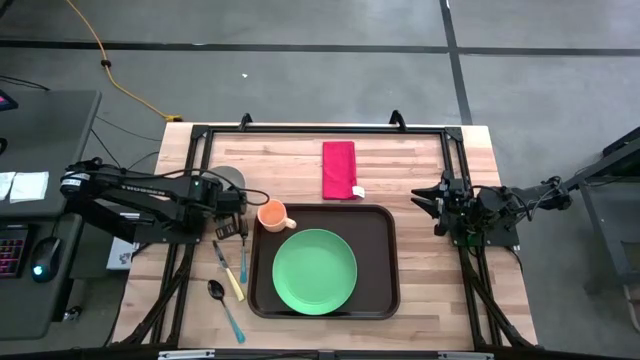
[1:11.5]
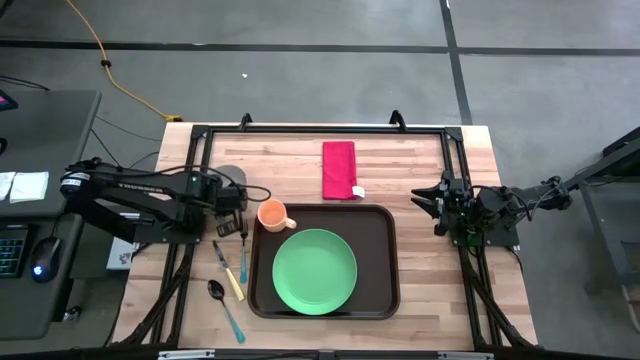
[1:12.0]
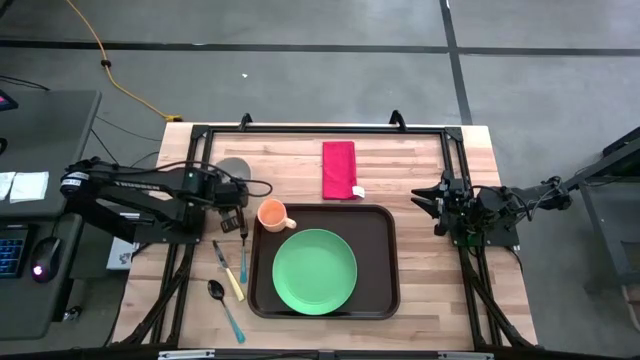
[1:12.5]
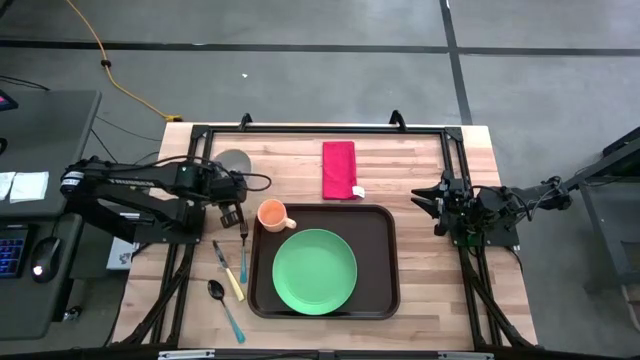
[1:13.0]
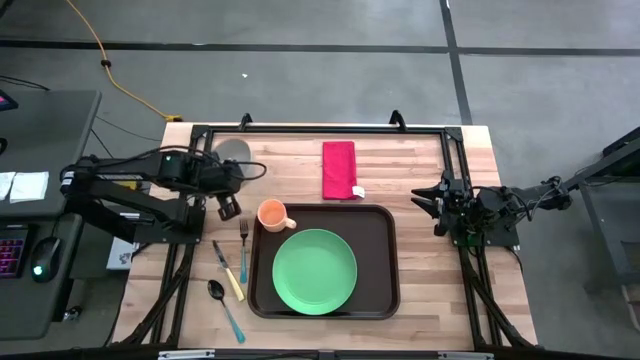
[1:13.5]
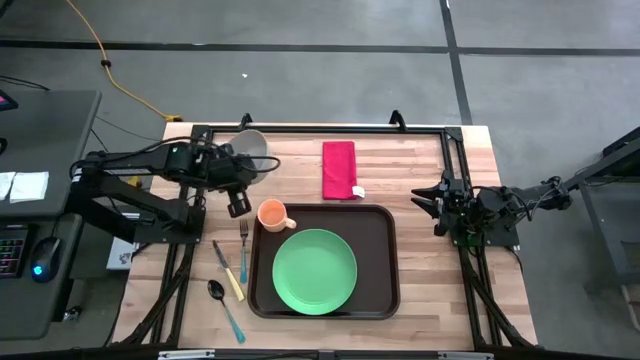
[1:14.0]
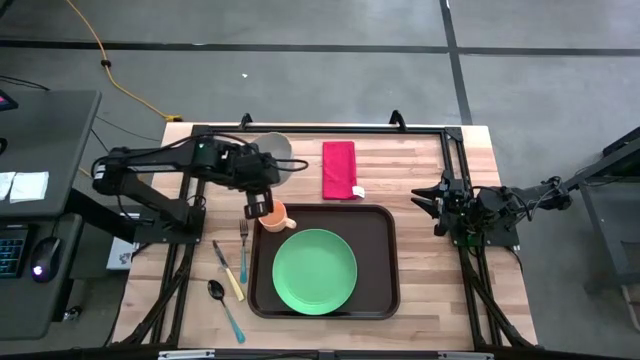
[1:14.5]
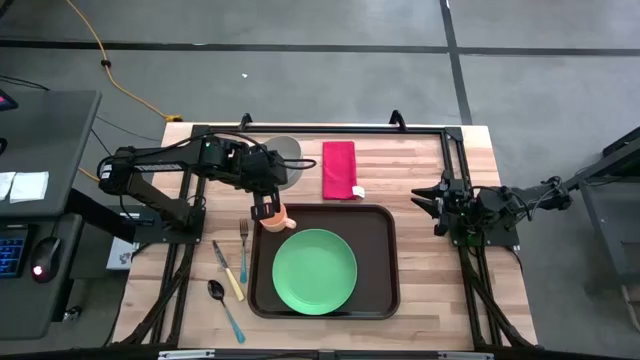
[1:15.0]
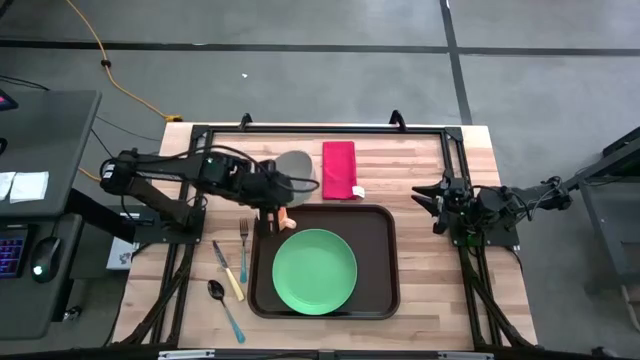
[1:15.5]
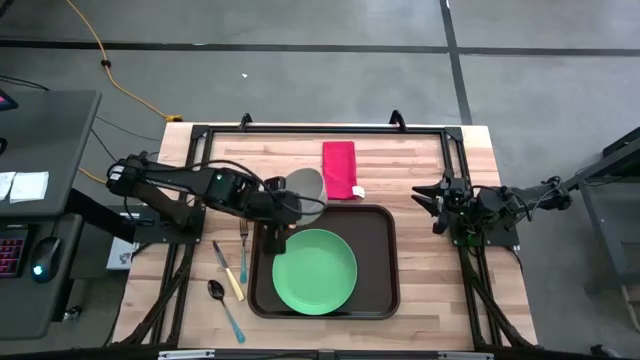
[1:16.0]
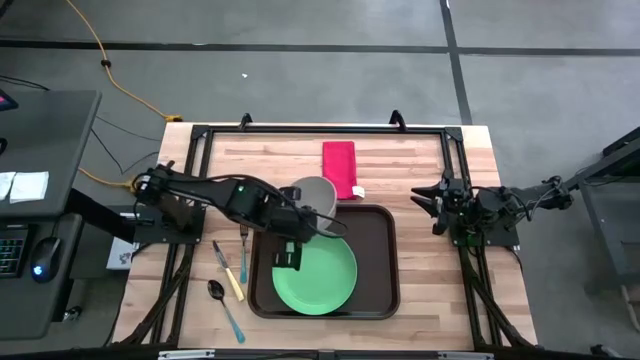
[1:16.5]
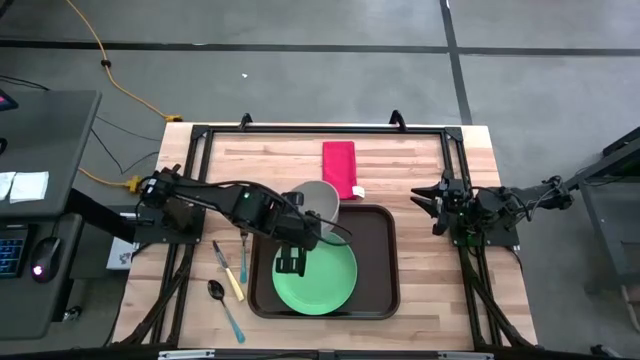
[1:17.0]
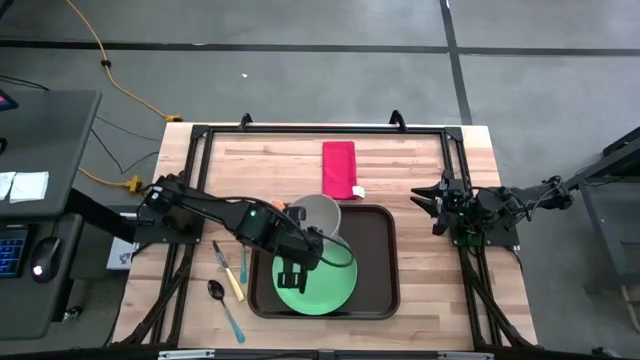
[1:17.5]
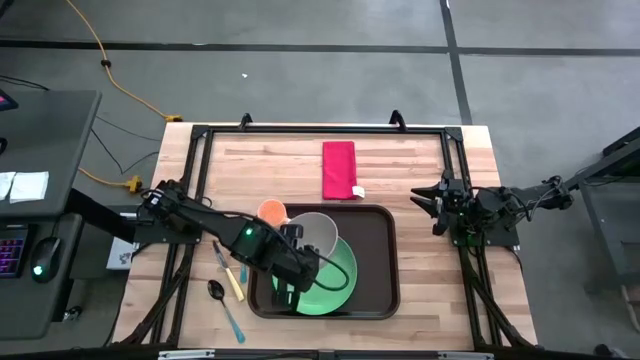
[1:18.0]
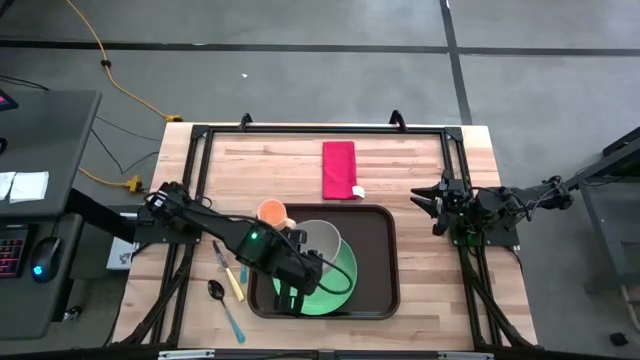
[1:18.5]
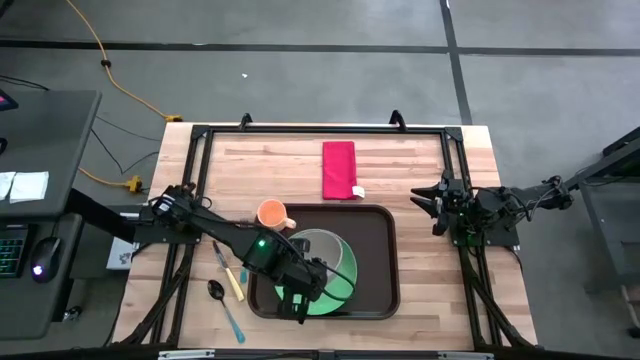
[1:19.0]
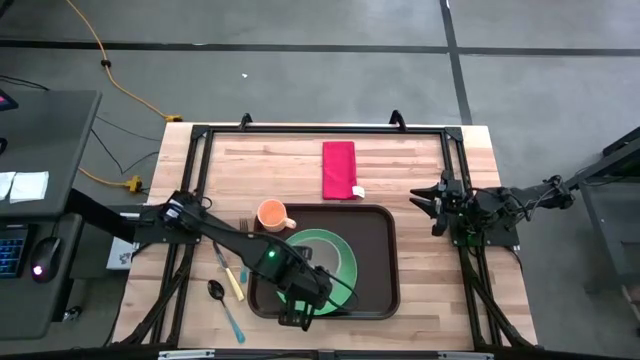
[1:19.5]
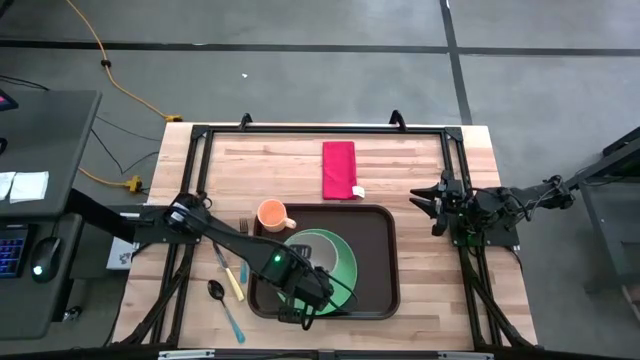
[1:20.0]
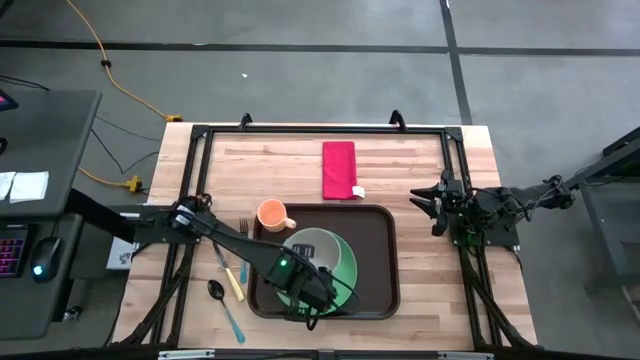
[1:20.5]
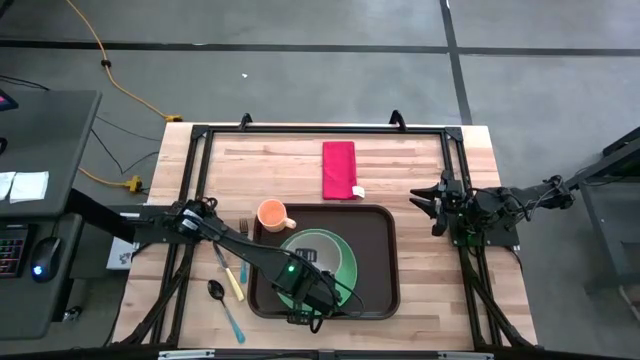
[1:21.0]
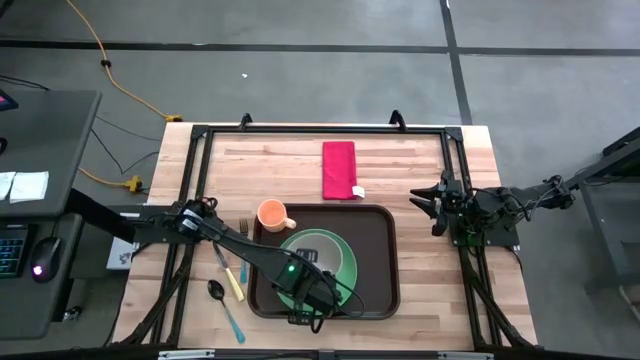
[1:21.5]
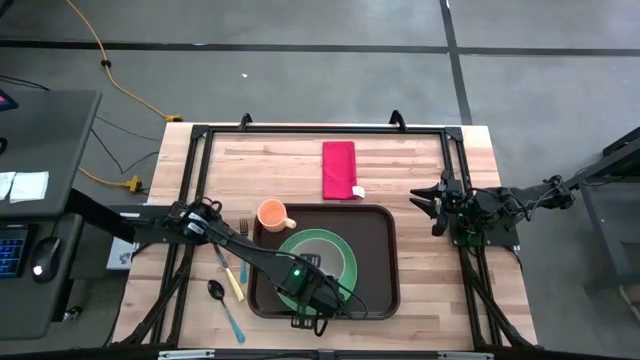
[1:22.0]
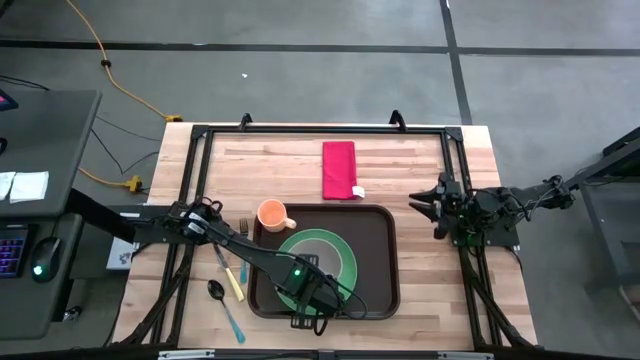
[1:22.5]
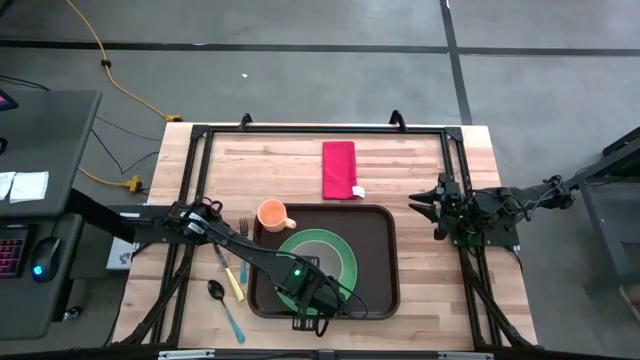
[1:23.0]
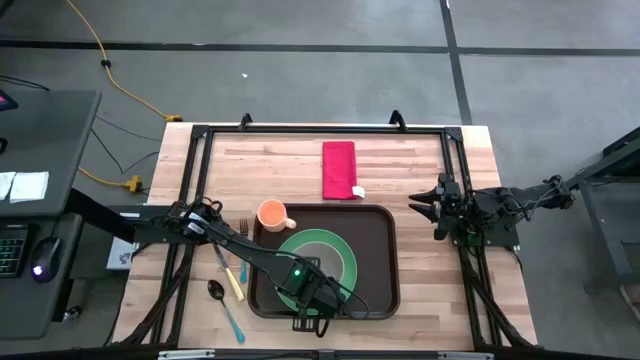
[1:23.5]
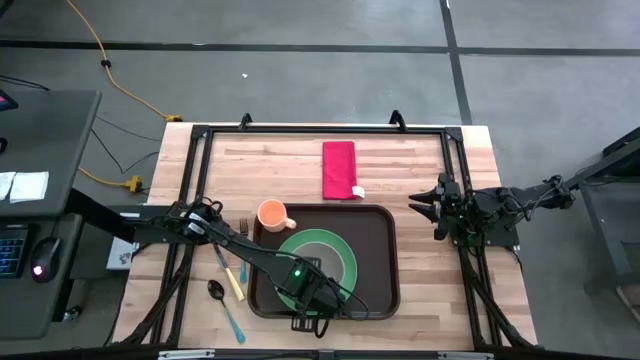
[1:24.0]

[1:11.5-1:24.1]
Task: Set up tray
Put the gray bowl on the green plate

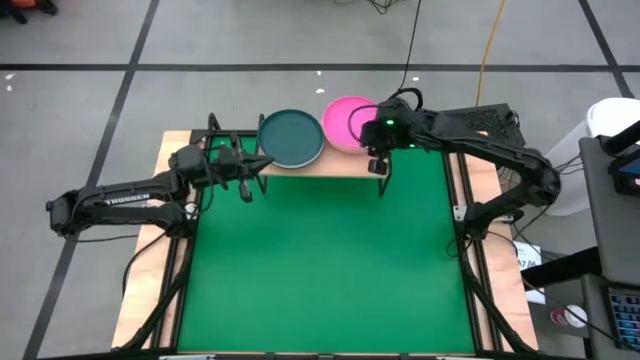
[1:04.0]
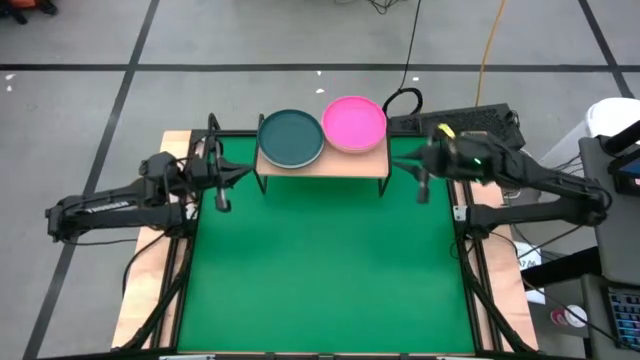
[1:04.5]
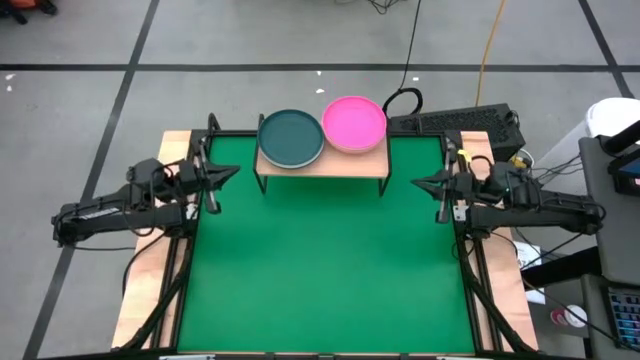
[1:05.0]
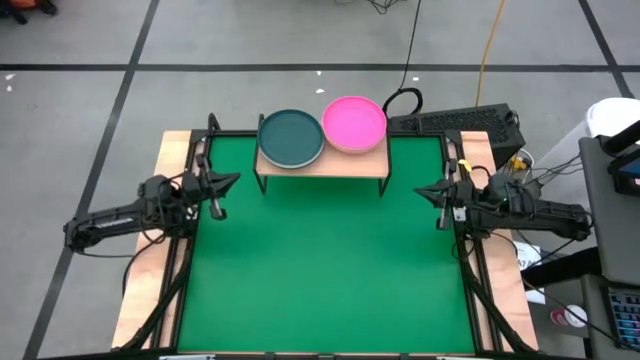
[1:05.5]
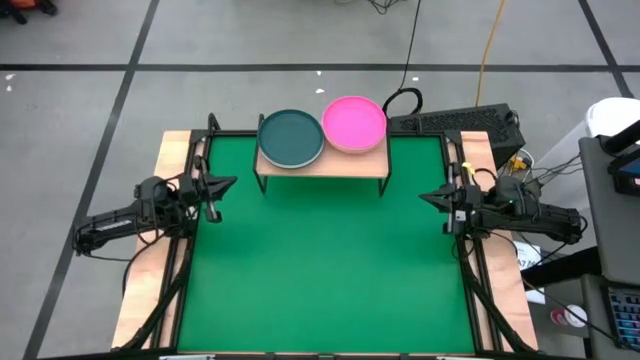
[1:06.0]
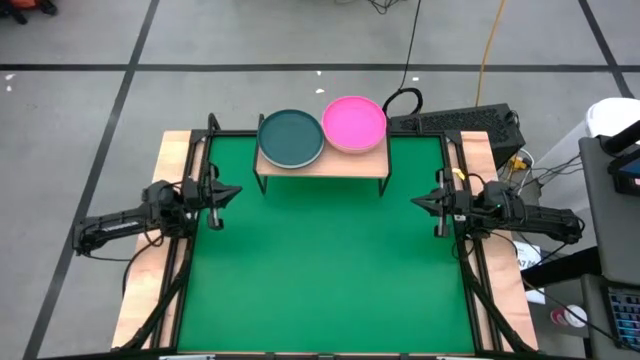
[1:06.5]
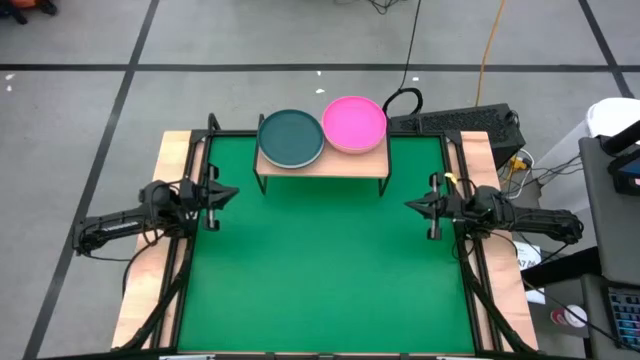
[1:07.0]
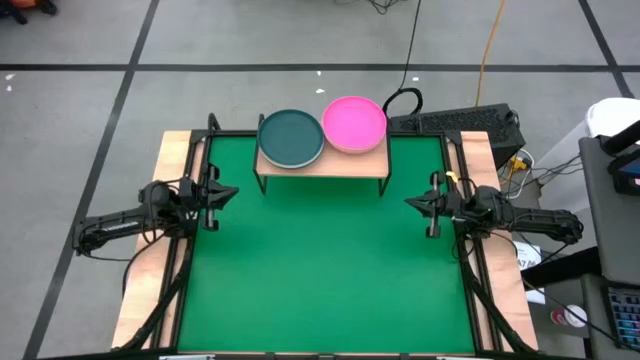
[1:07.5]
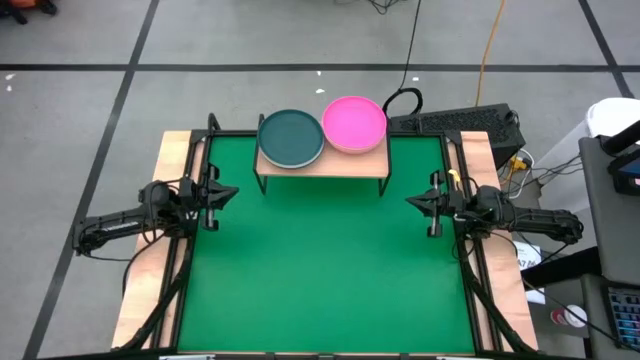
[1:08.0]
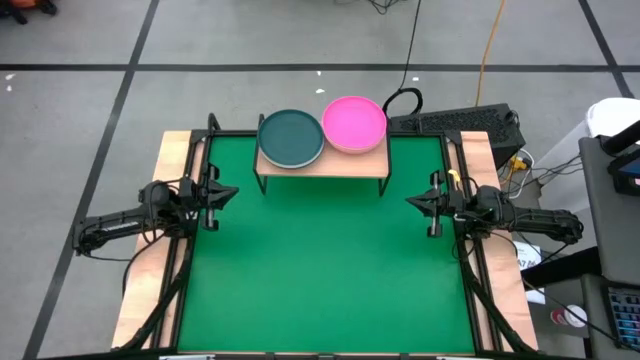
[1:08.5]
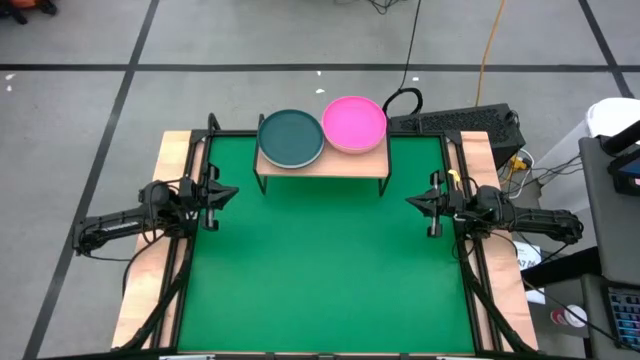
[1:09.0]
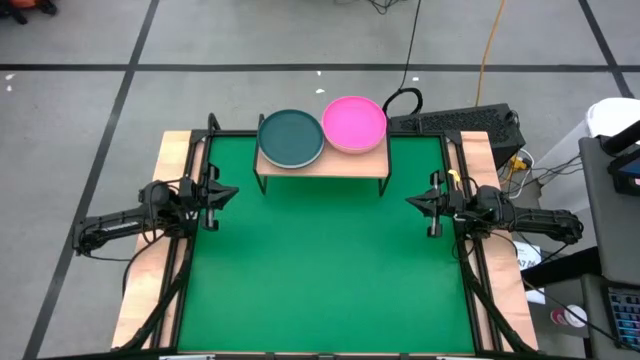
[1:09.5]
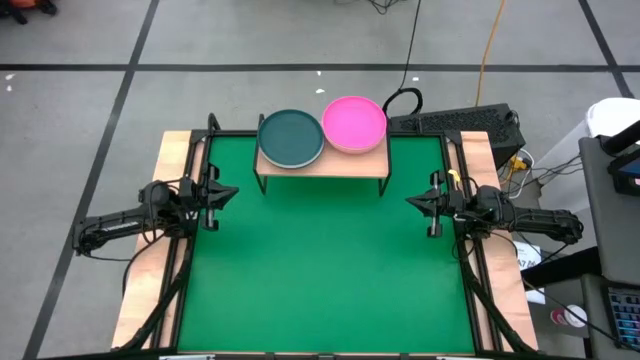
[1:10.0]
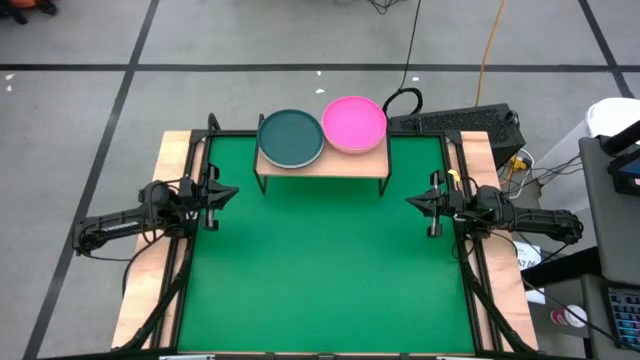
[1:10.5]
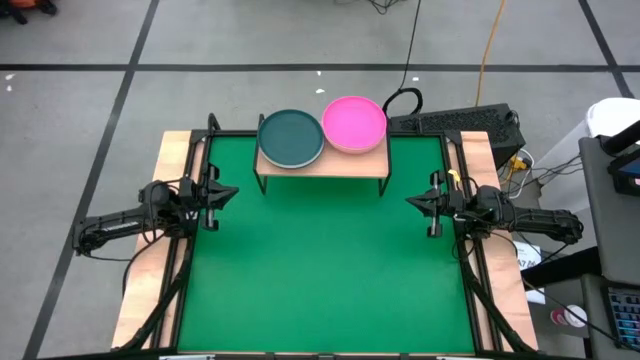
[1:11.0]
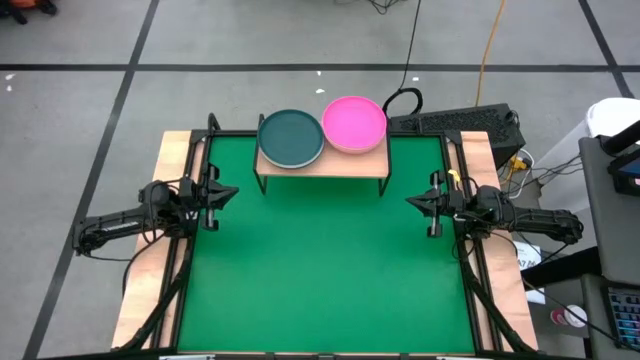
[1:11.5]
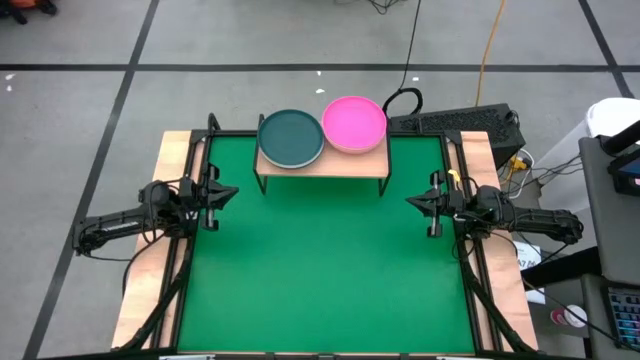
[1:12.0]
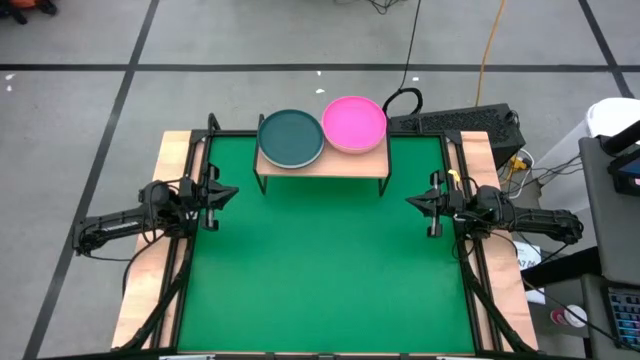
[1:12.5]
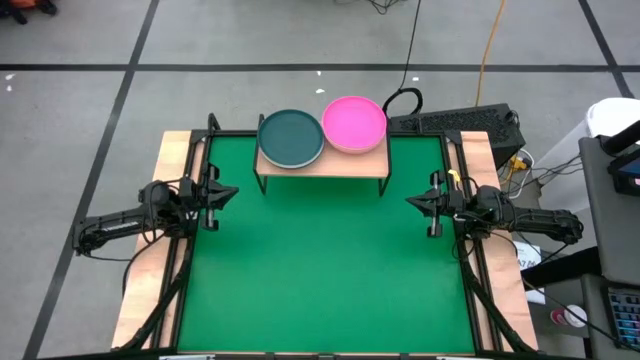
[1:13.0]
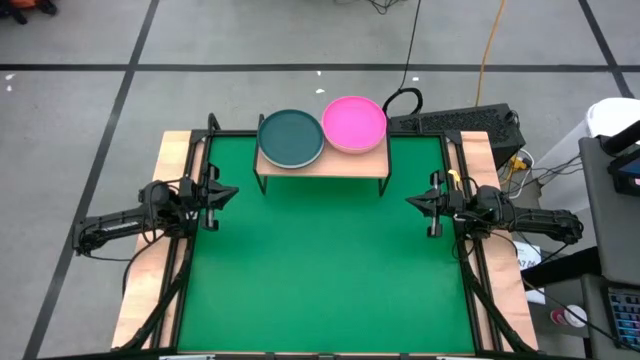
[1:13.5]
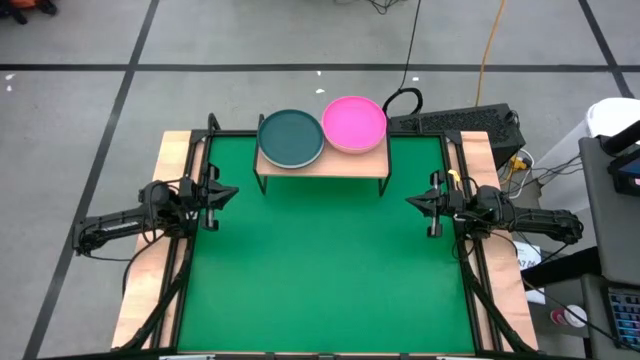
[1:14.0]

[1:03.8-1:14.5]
Task: Place and stack plates onto a shelf
Return to Home Position
